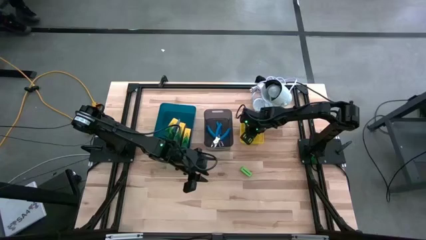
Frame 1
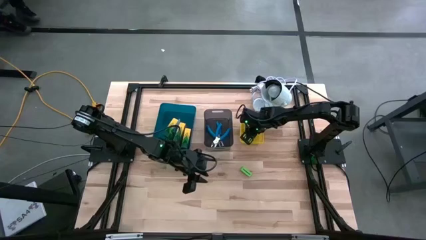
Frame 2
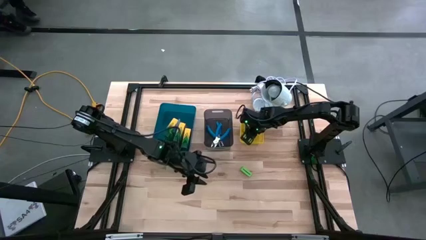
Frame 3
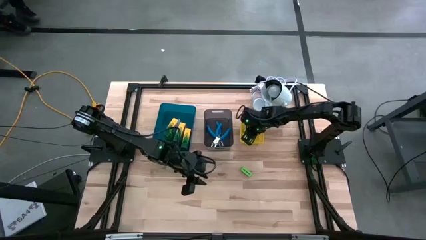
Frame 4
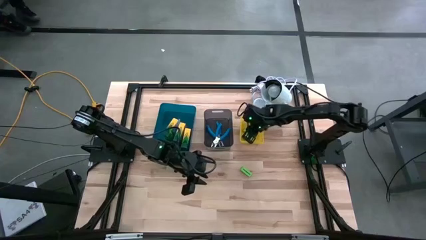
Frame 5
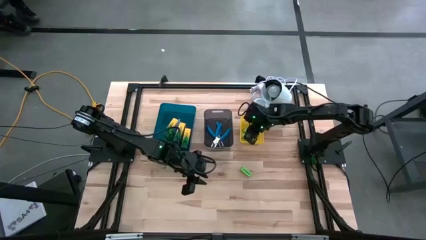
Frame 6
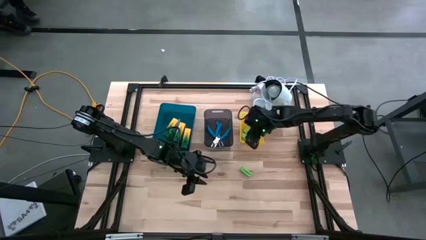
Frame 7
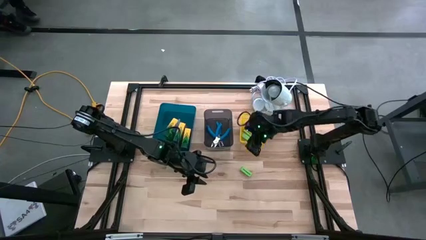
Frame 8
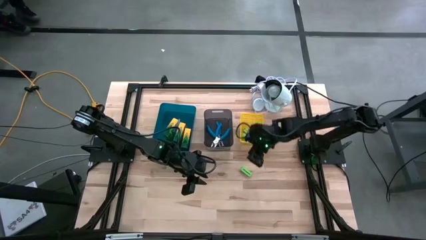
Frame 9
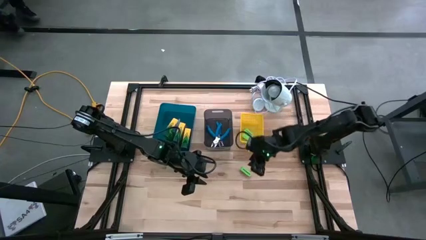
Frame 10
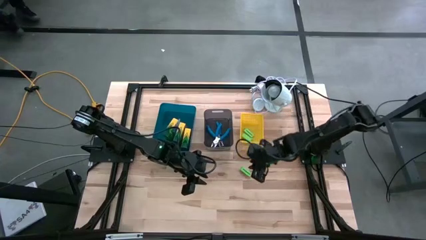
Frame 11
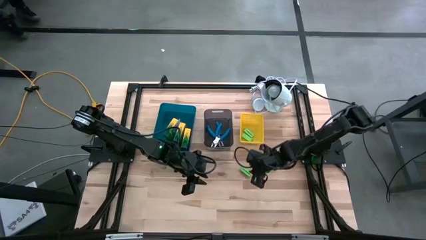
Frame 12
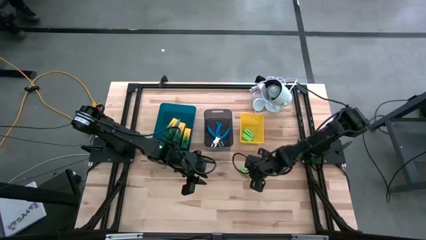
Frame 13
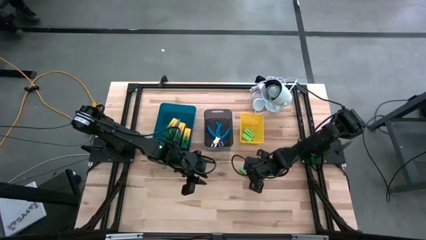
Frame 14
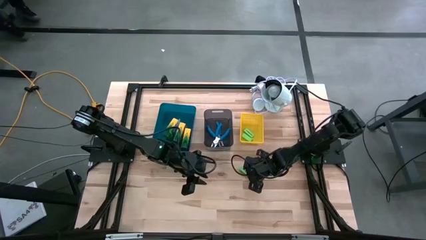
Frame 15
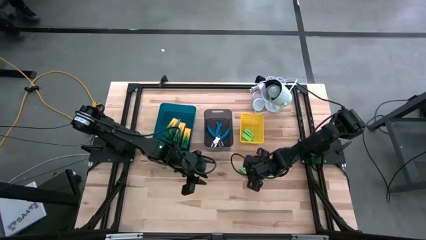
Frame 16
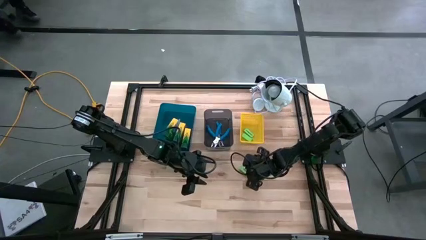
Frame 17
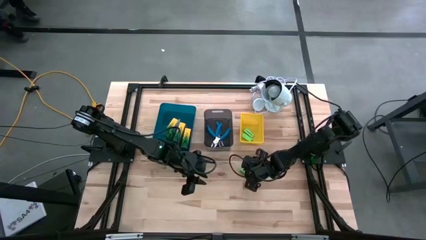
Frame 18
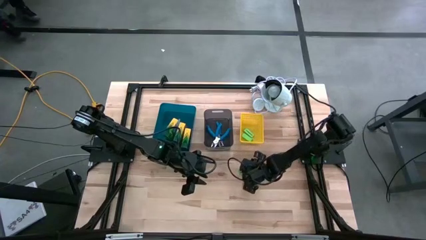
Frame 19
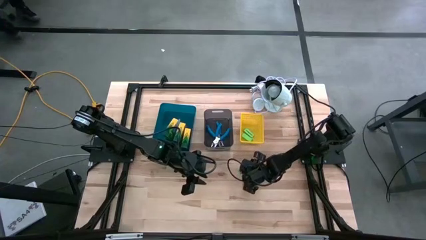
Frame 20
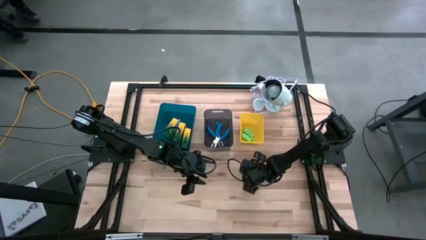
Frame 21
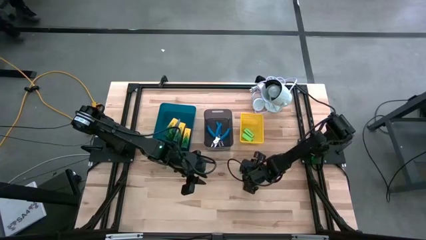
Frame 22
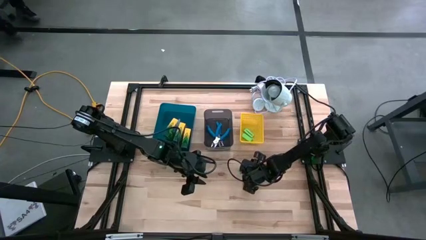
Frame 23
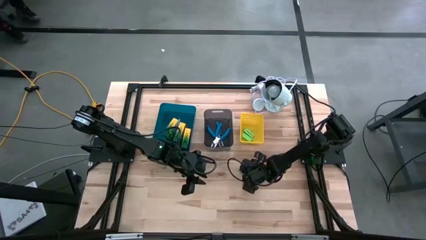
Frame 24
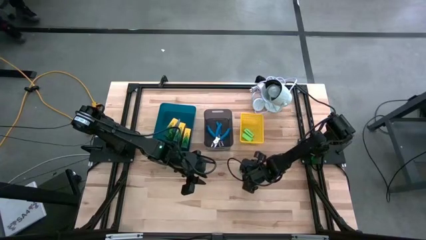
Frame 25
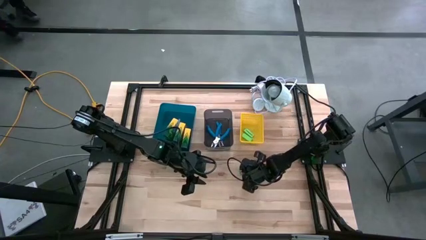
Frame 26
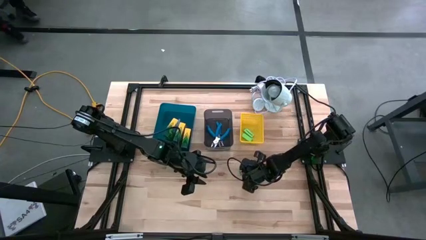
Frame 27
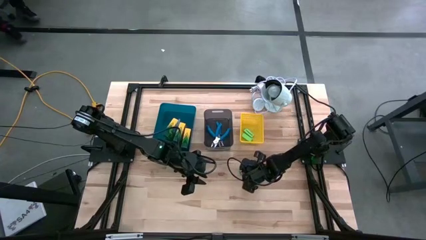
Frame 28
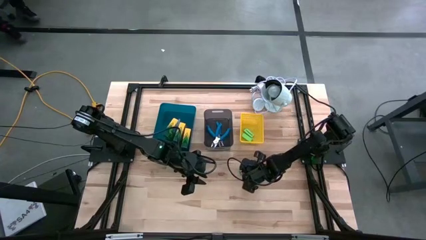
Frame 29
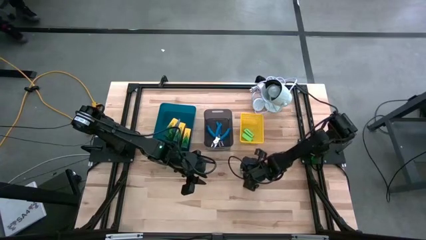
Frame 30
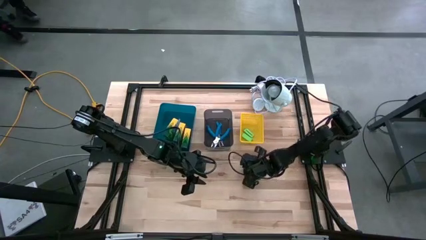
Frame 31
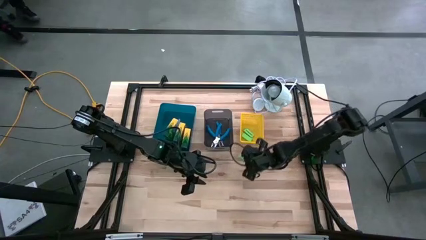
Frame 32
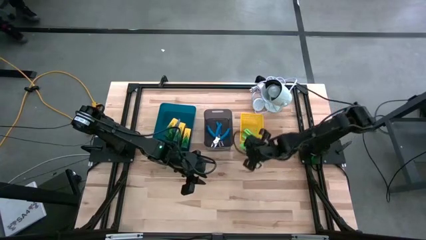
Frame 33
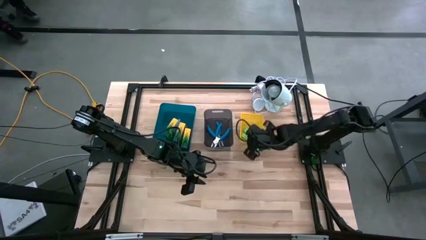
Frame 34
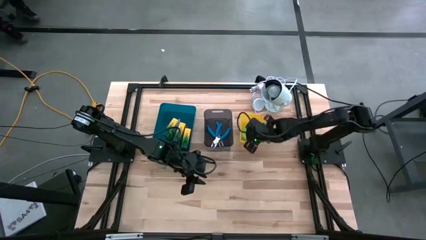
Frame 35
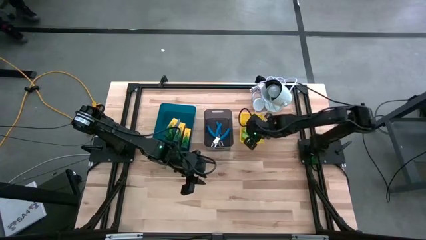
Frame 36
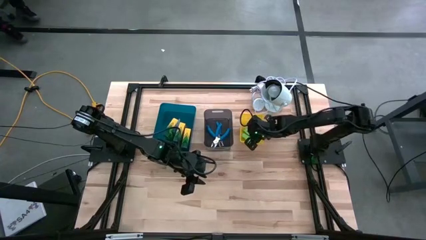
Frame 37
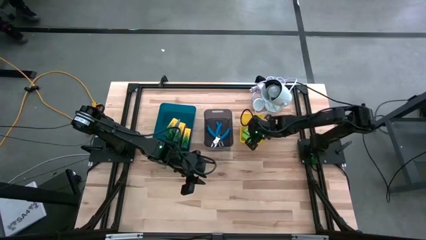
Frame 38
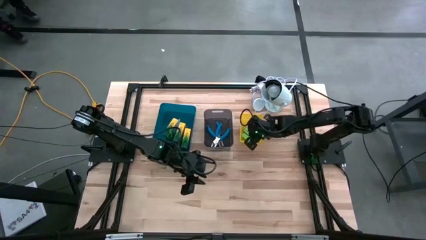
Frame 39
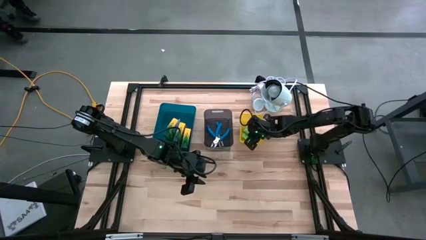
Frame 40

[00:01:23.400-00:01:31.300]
Task: Pick & Place School Supplies
Put the green eraser into the yellow bin
